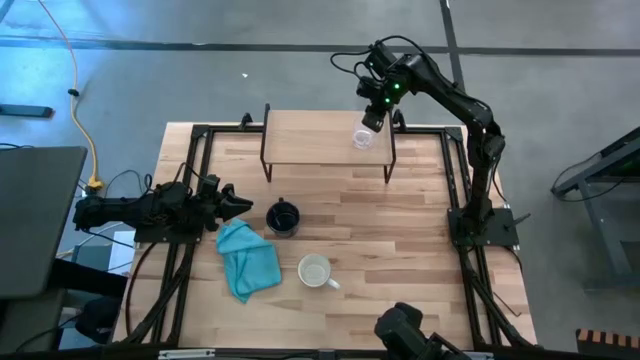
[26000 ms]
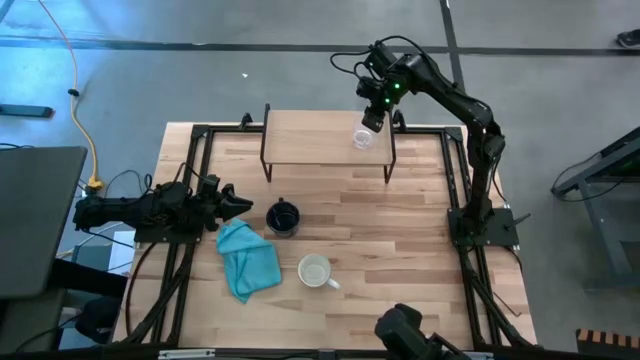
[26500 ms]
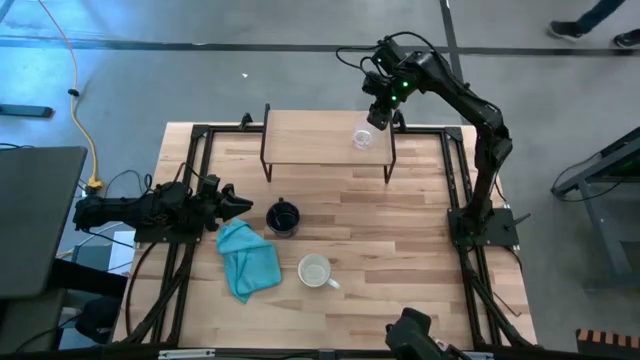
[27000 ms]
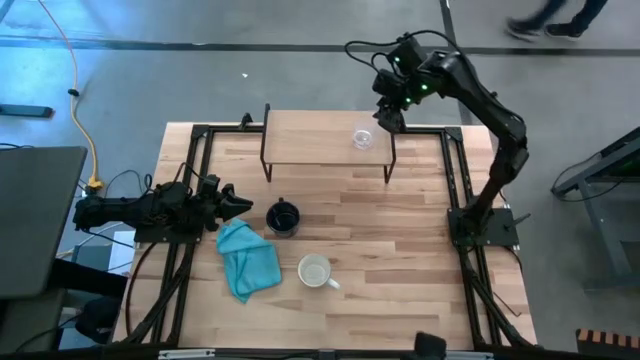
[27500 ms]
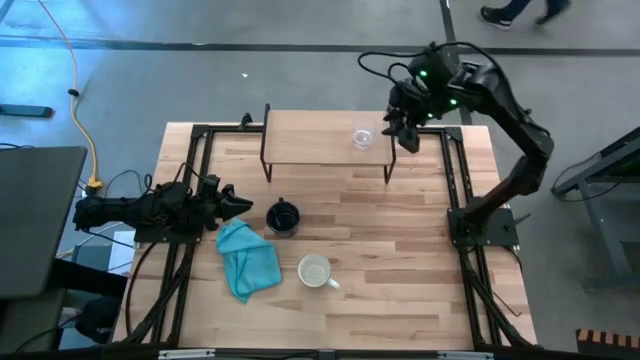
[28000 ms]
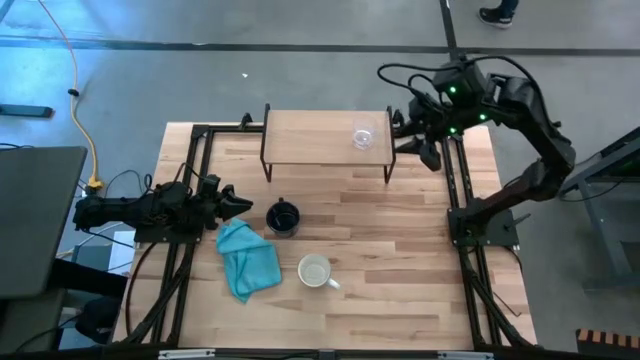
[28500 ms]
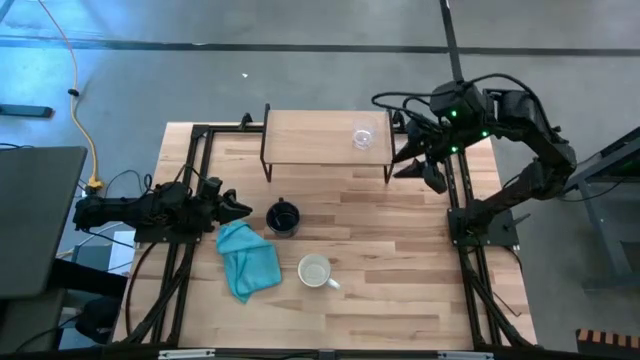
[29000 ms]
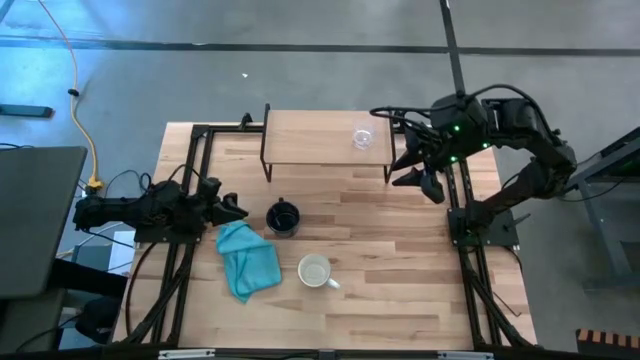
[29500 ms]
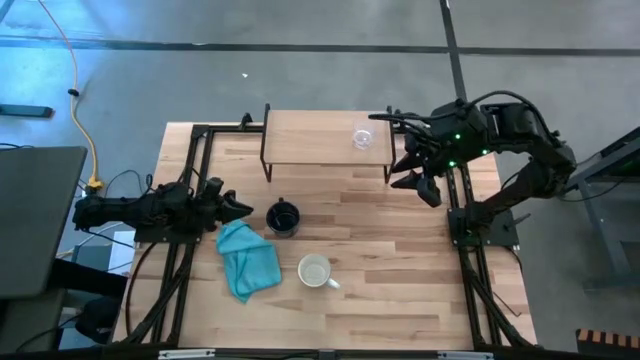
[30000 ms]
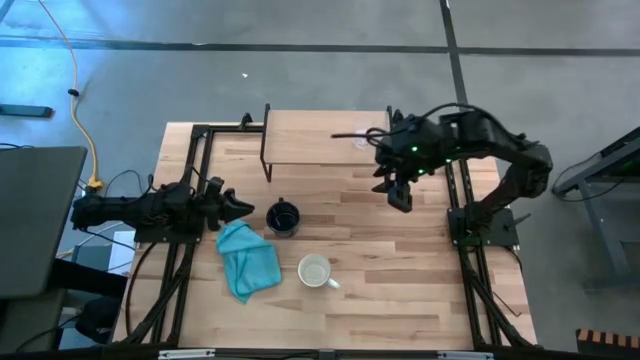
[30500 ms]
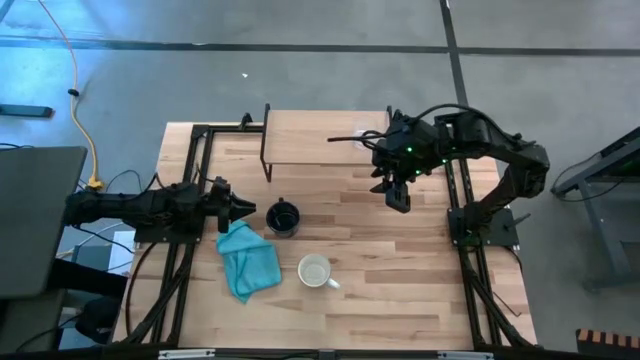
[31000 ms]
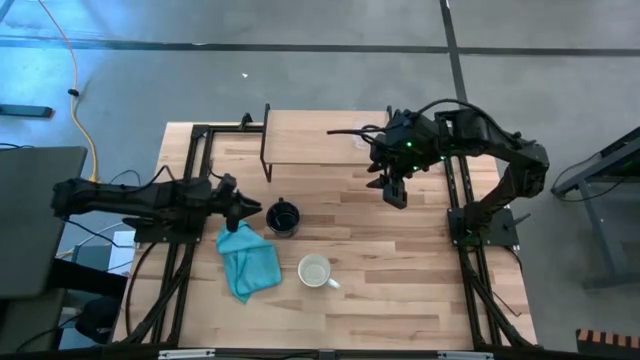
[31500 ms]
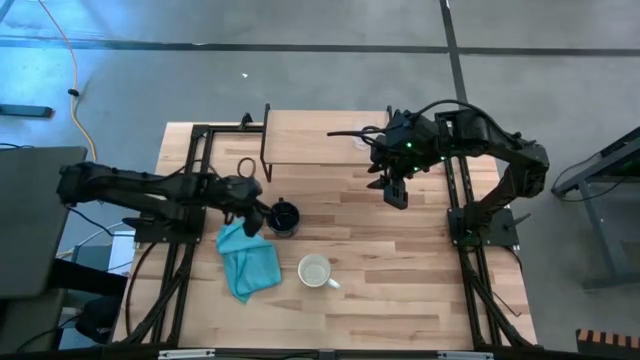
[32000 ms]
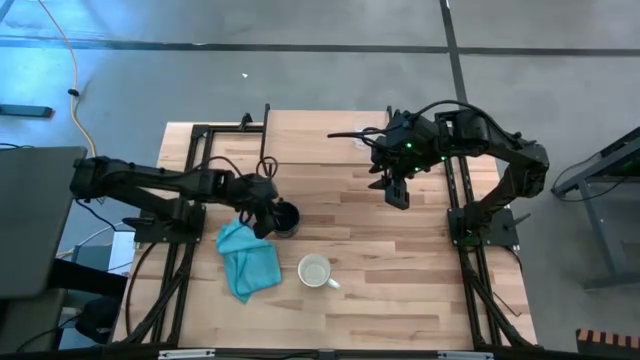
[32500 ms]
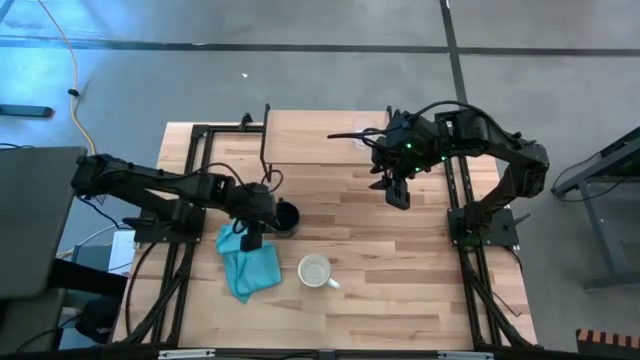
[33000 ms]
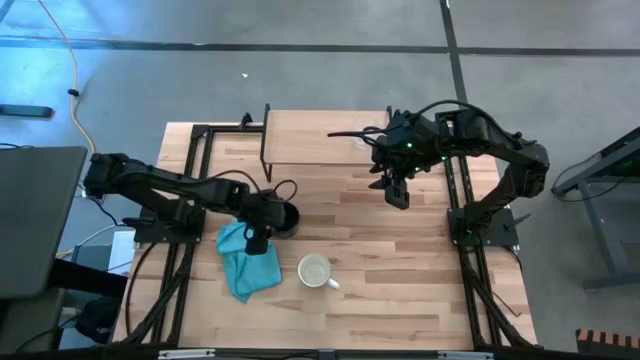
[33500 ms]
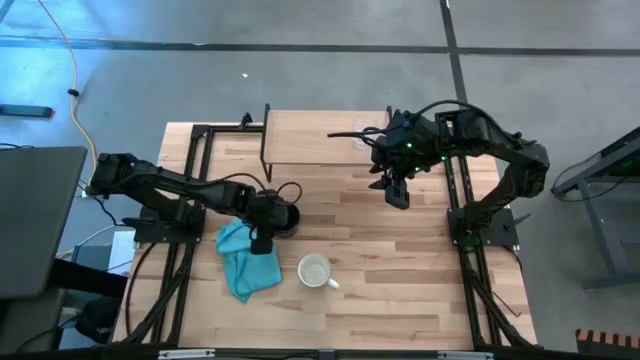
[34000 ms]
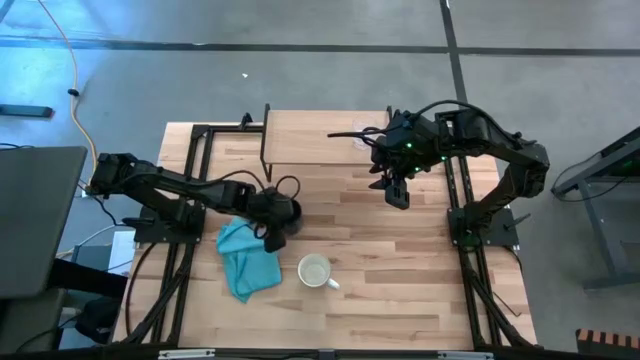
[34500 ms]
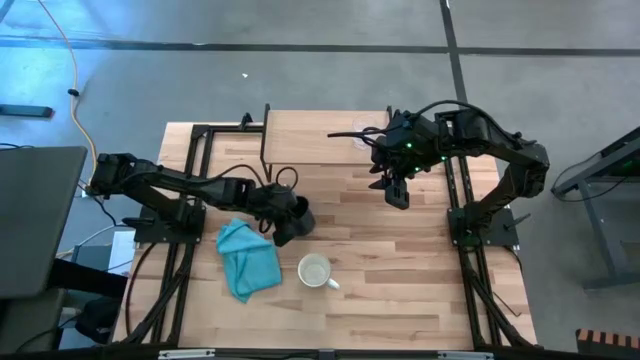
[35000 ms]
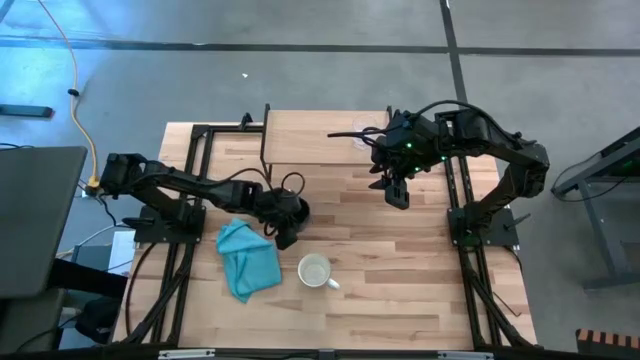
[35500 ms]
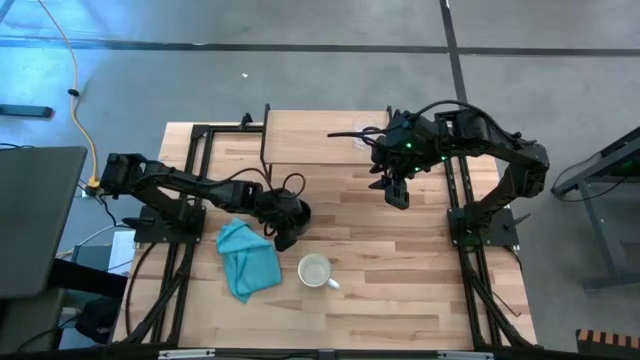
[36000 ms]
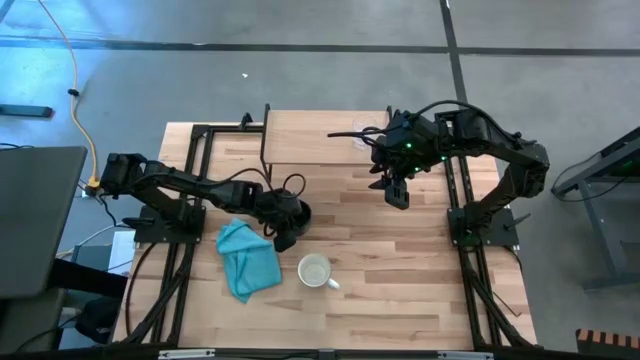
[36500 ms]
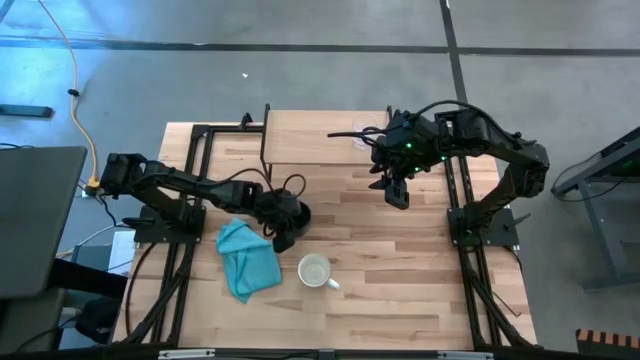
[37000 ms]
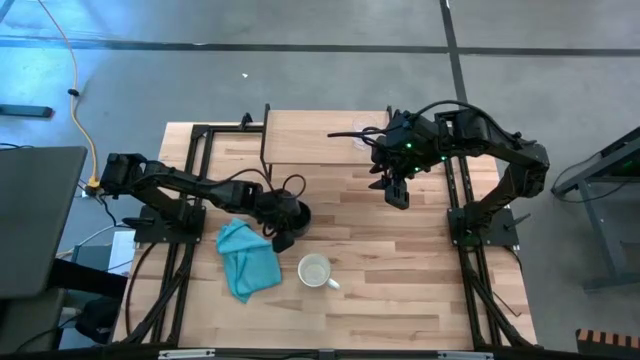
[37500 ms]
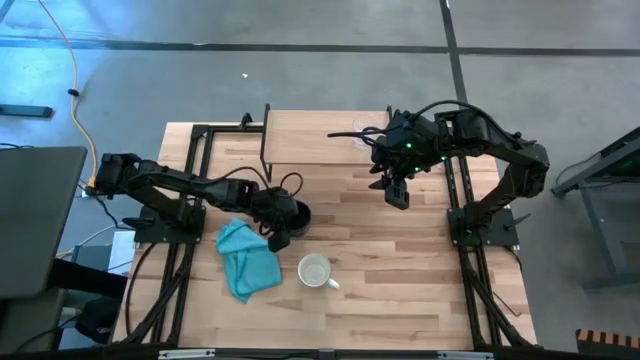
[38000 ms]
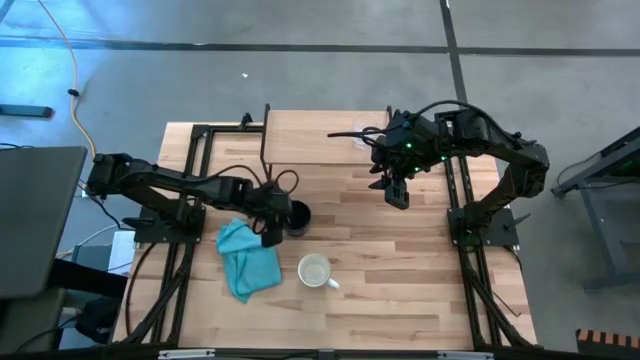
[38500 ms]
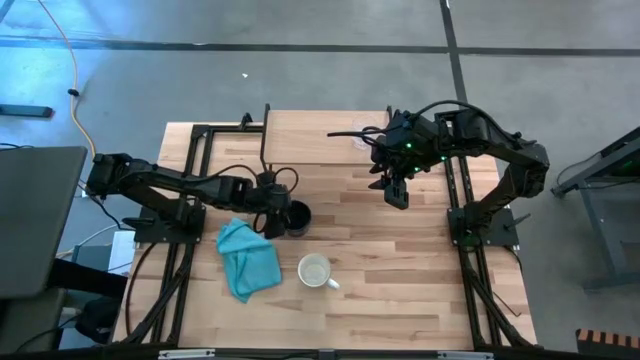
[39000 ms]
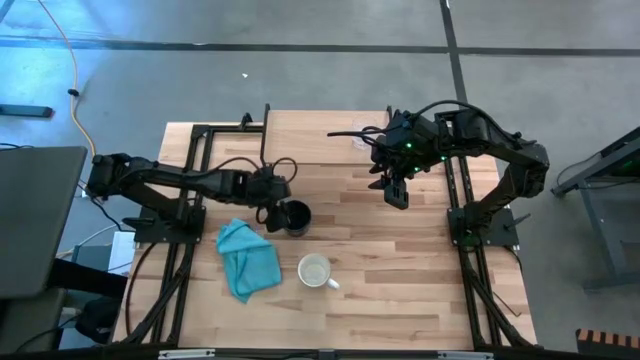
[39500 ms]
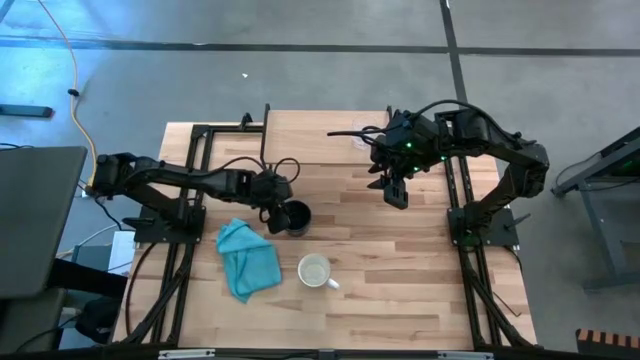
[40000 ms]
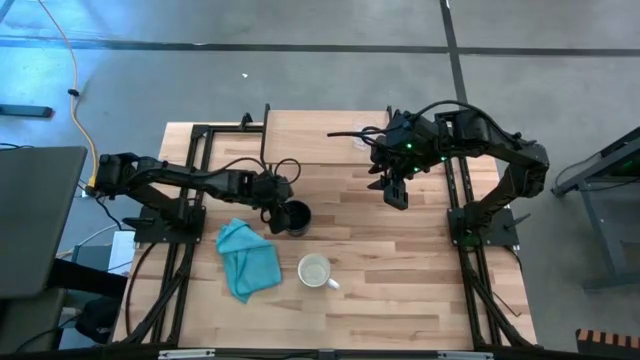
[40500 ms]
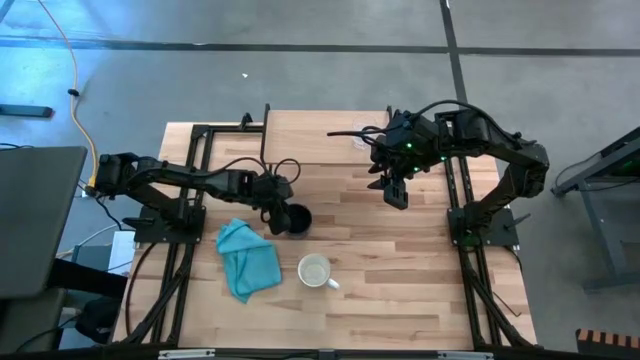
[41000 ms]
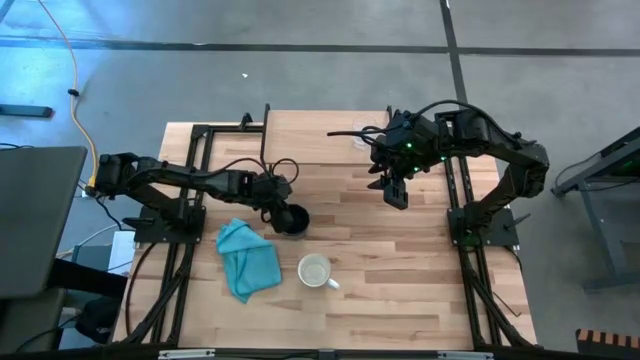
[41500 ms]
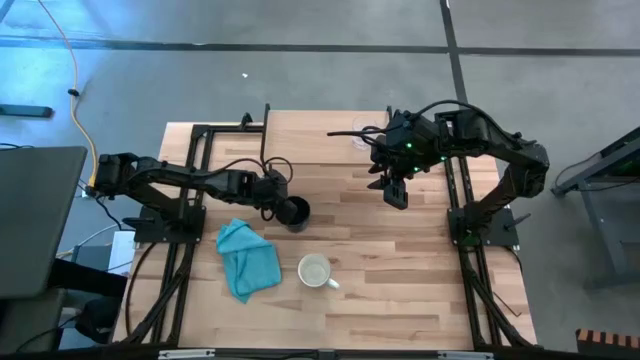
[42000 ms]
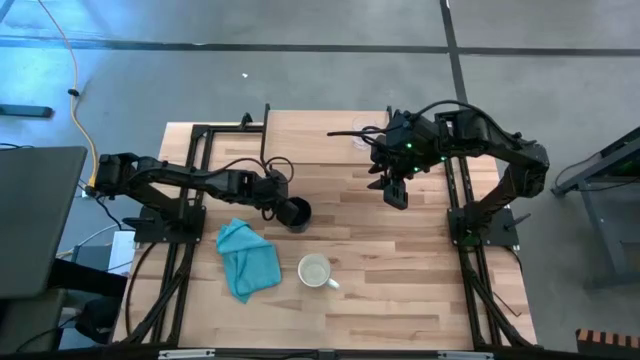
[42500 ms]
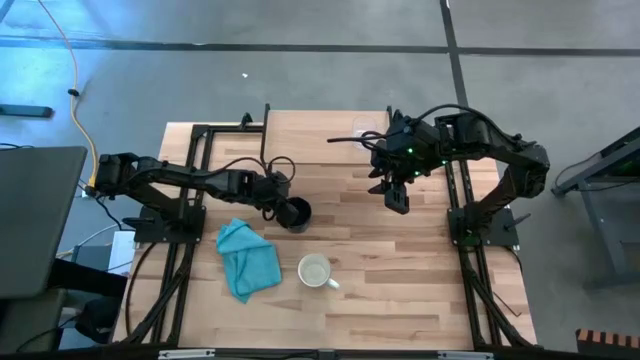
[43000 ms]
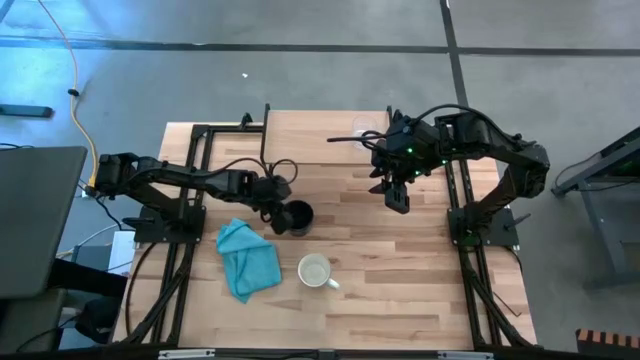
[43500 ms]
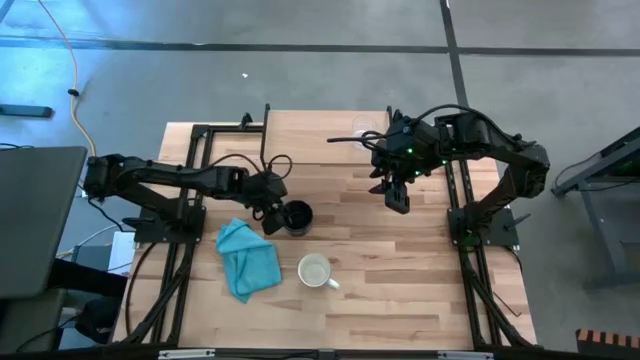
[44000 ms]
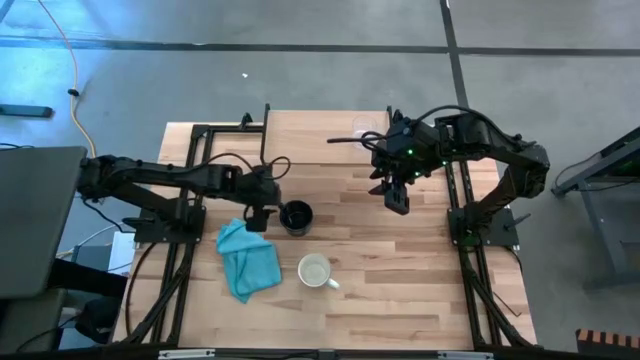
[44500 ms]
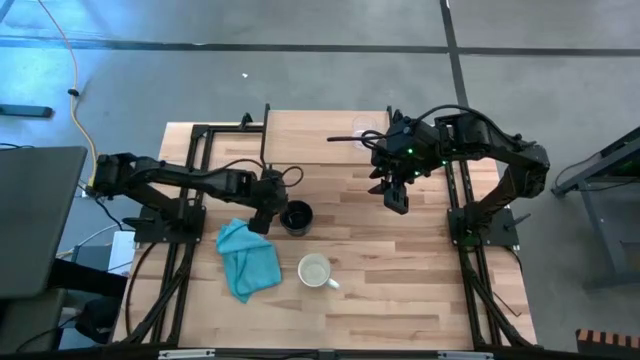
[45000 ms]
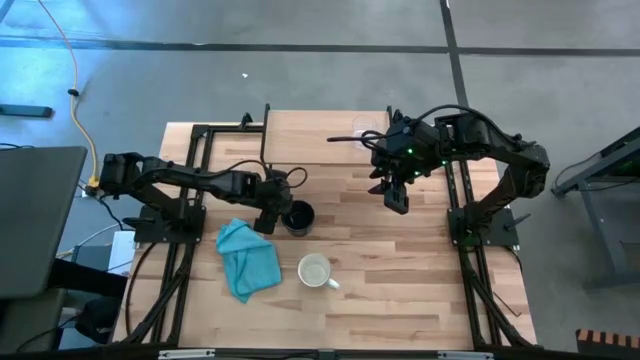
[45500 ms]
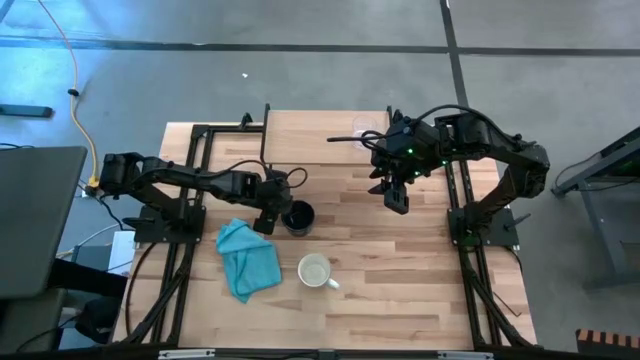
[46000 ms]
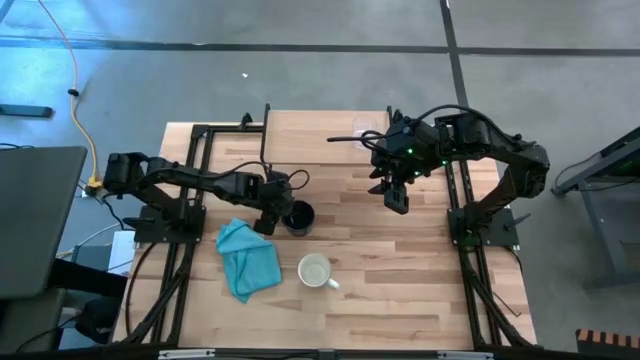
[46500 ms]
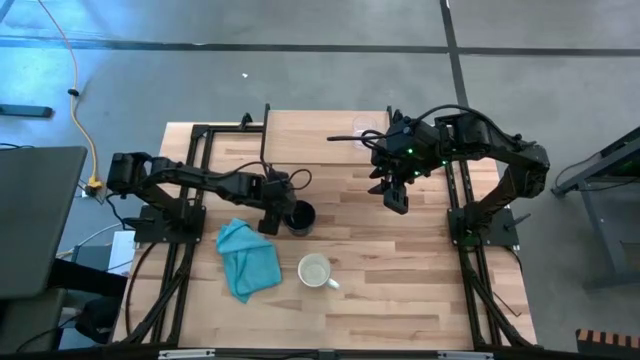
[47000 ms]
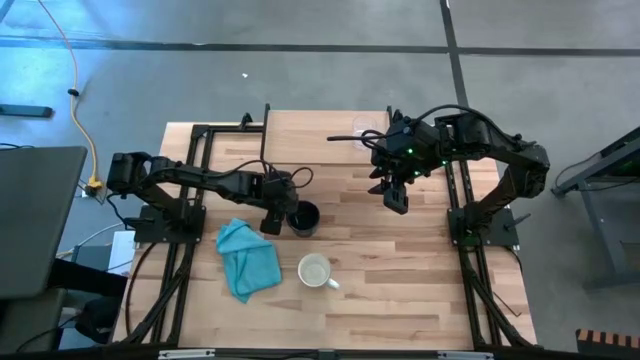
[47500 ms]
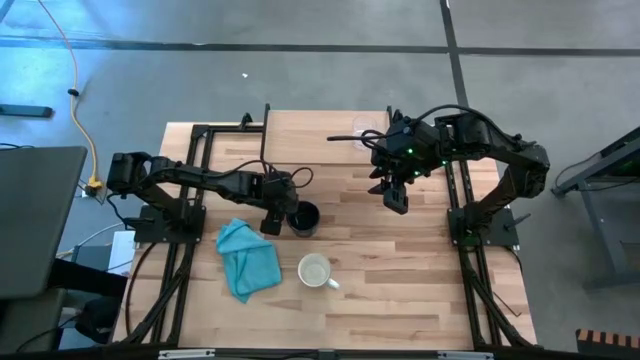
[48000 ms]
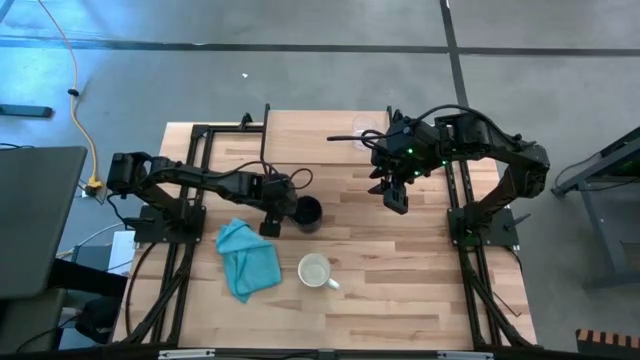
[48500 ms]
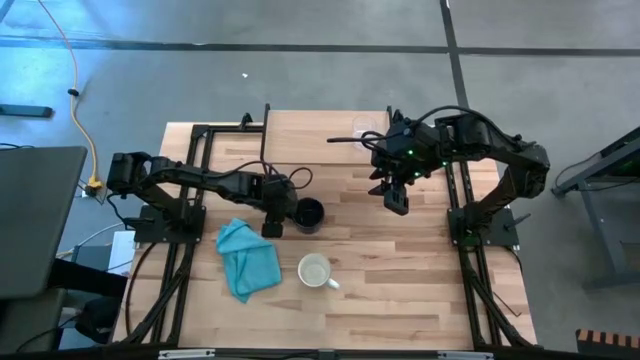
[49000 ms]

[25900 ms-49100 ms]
Task: Stack small to large cups/mugs on shelf
Put the dark blue mug on the shelf
